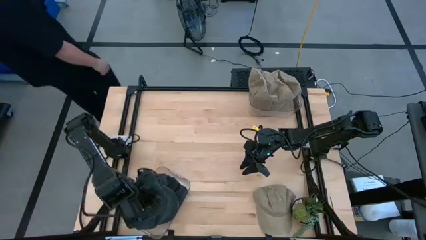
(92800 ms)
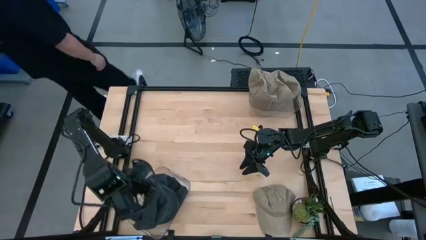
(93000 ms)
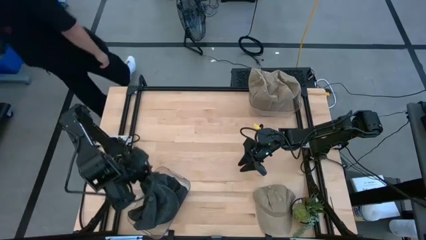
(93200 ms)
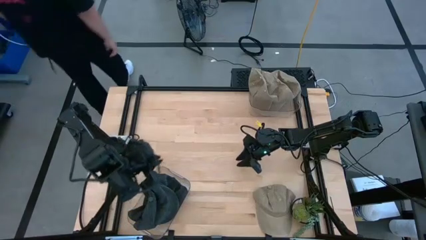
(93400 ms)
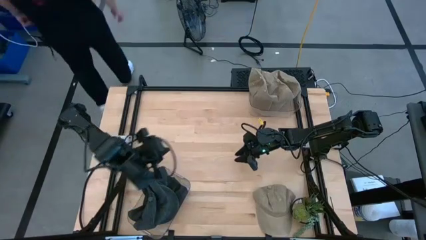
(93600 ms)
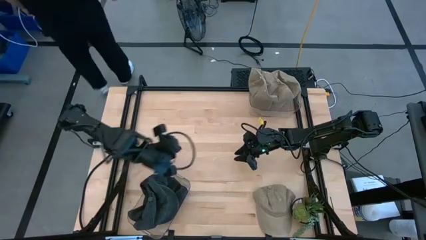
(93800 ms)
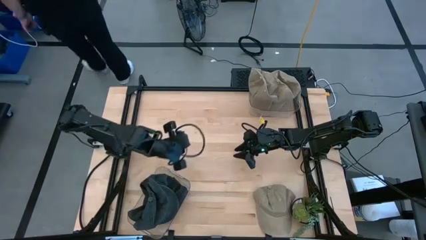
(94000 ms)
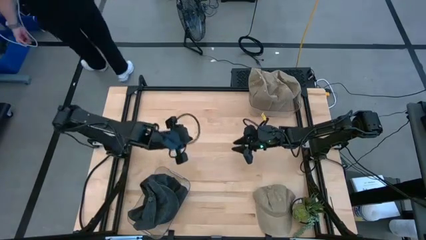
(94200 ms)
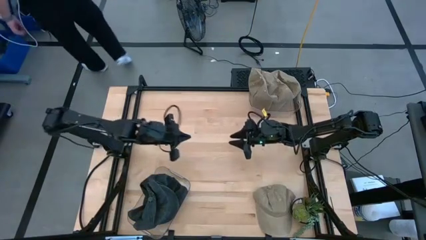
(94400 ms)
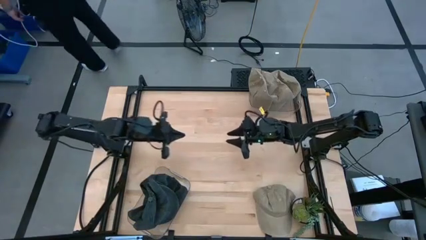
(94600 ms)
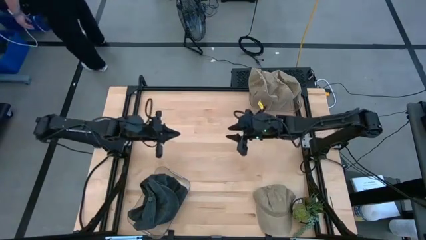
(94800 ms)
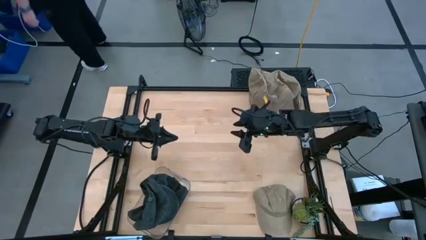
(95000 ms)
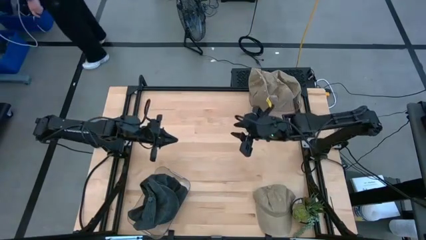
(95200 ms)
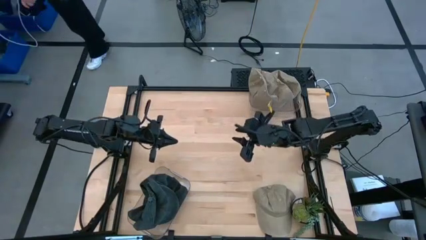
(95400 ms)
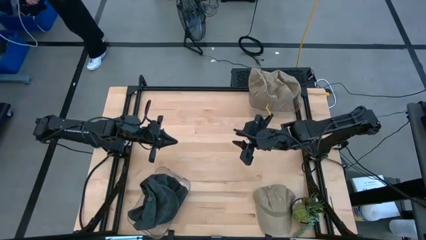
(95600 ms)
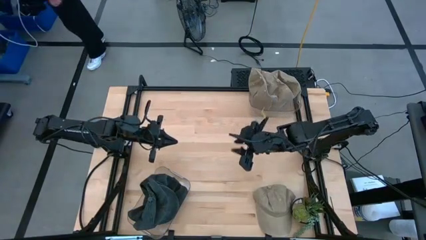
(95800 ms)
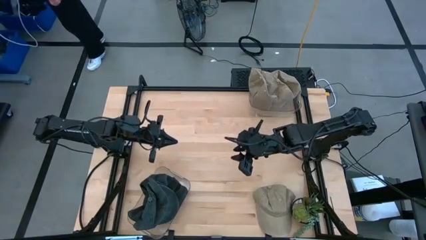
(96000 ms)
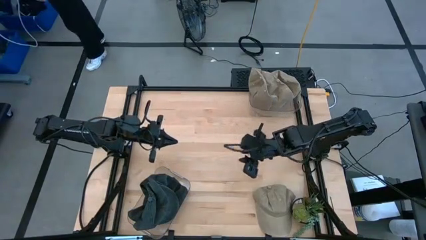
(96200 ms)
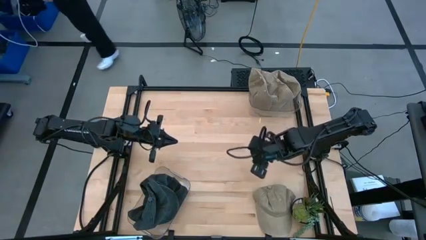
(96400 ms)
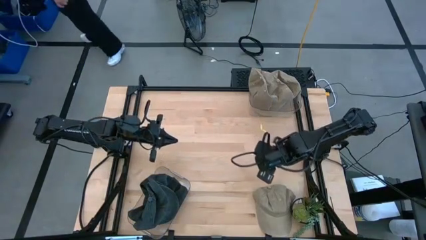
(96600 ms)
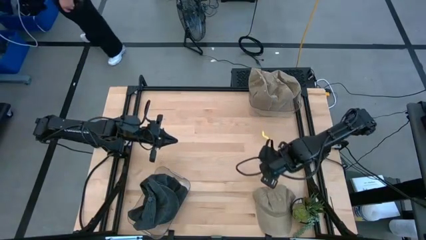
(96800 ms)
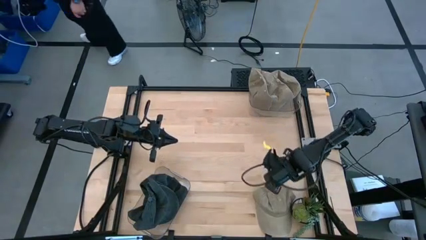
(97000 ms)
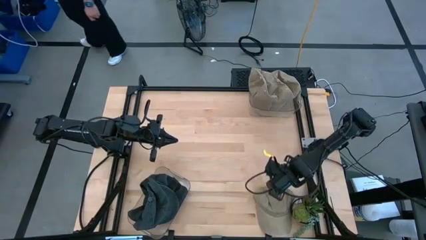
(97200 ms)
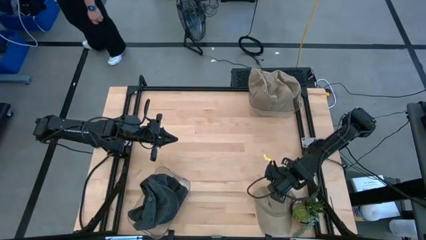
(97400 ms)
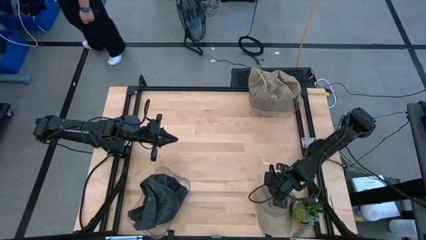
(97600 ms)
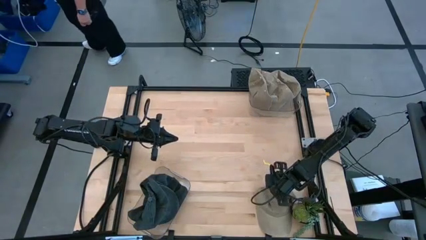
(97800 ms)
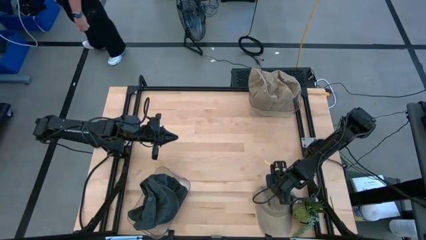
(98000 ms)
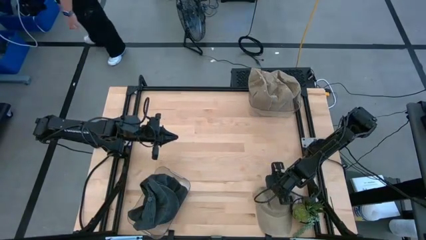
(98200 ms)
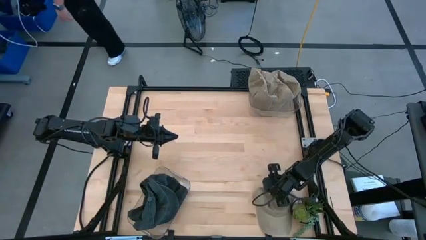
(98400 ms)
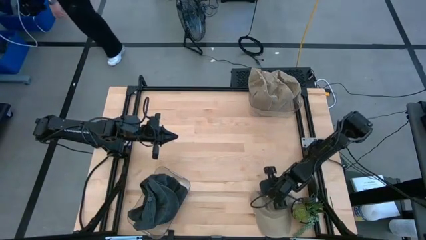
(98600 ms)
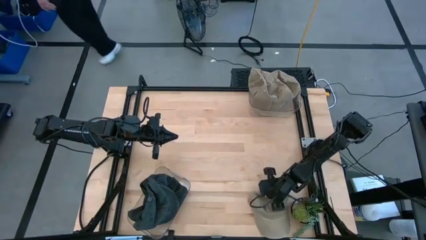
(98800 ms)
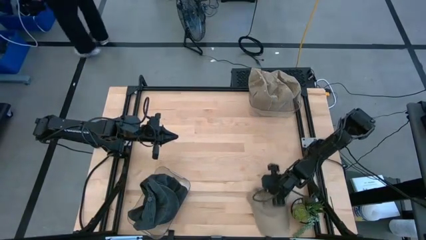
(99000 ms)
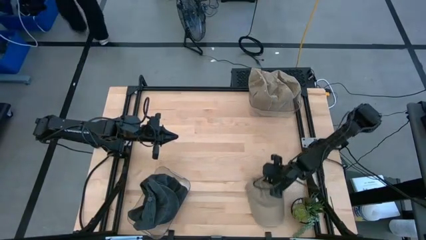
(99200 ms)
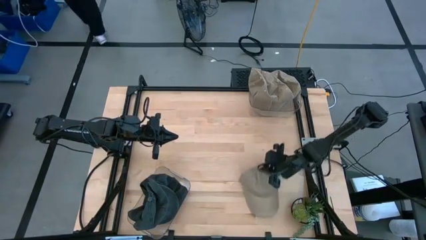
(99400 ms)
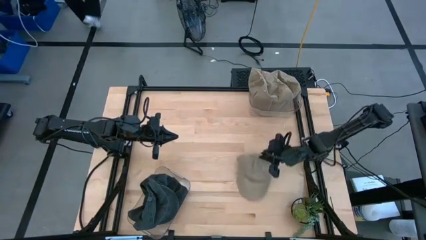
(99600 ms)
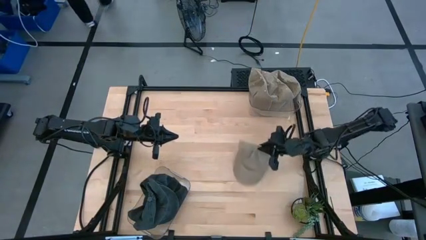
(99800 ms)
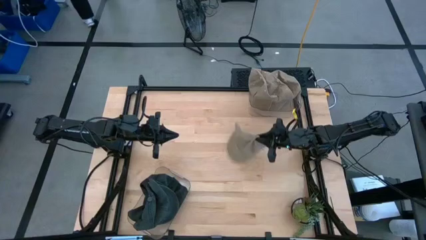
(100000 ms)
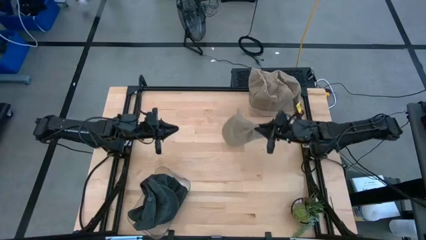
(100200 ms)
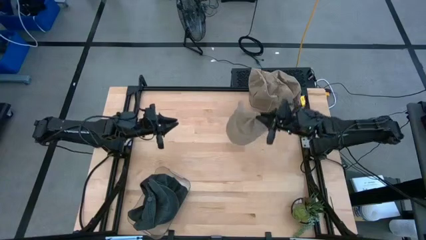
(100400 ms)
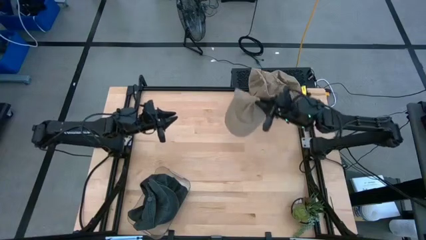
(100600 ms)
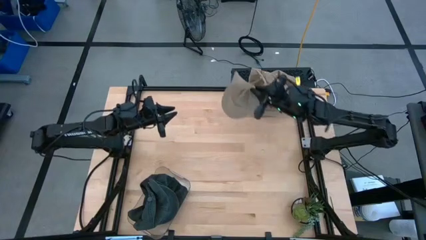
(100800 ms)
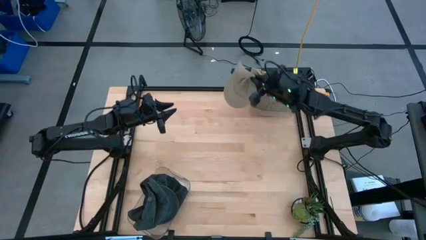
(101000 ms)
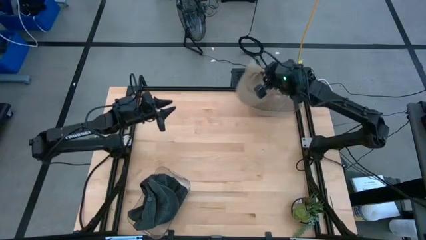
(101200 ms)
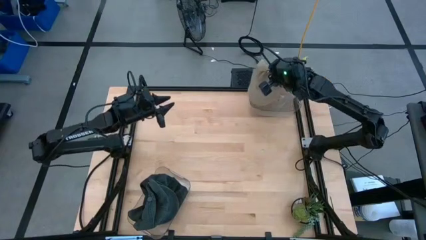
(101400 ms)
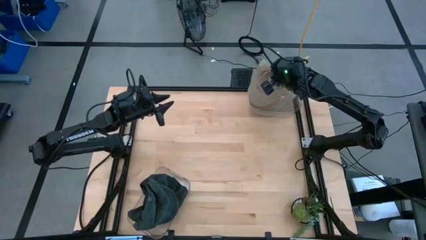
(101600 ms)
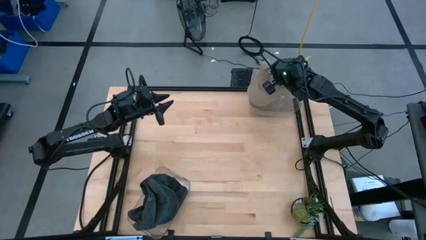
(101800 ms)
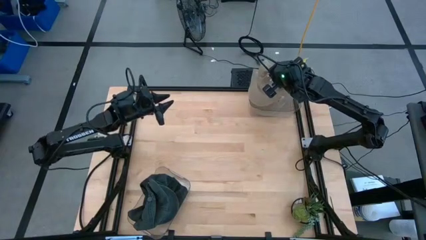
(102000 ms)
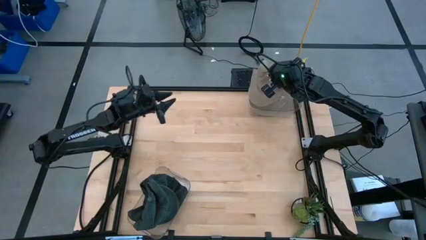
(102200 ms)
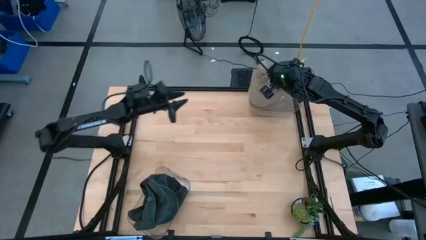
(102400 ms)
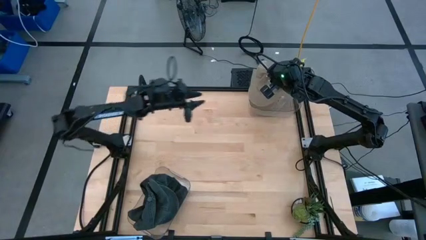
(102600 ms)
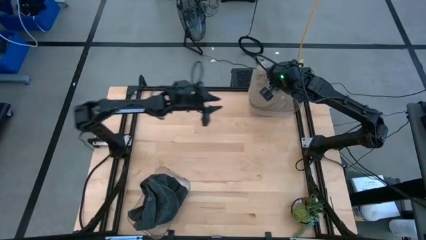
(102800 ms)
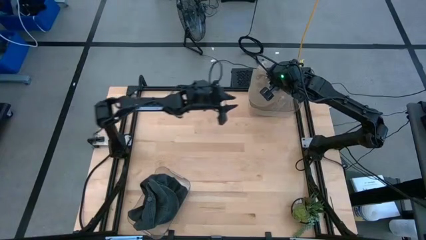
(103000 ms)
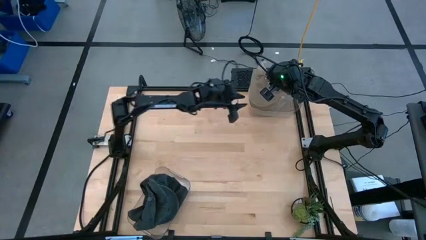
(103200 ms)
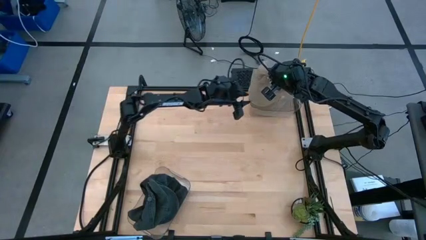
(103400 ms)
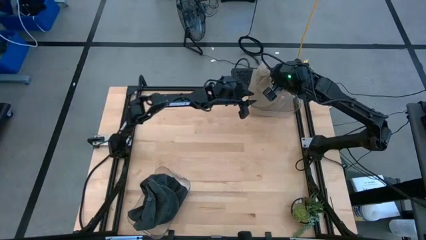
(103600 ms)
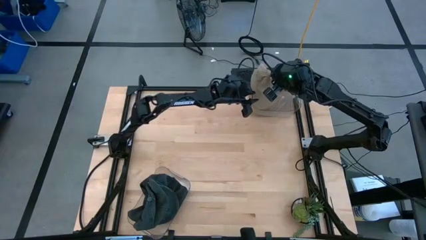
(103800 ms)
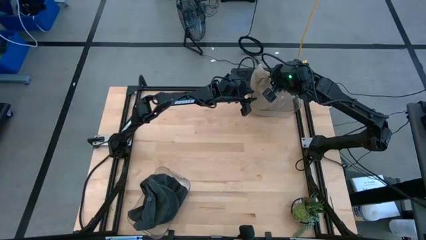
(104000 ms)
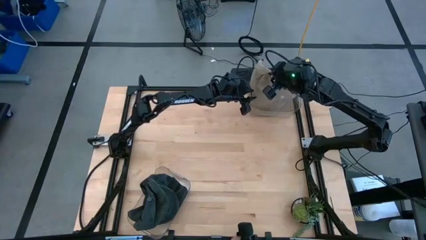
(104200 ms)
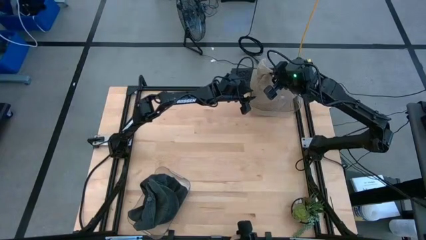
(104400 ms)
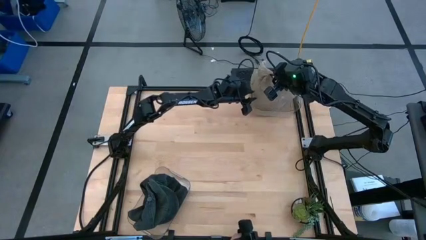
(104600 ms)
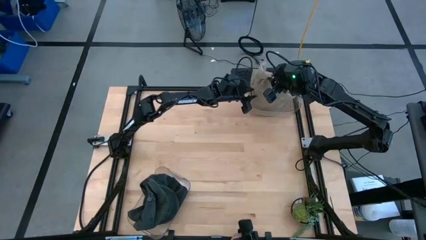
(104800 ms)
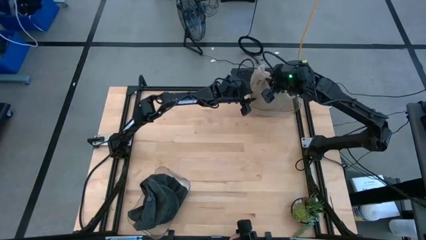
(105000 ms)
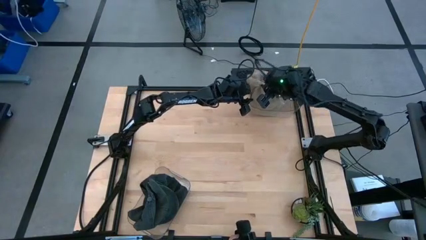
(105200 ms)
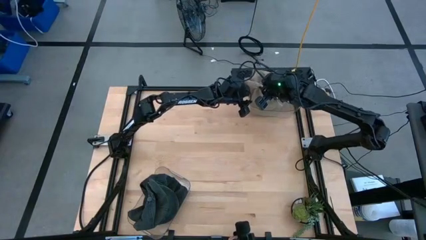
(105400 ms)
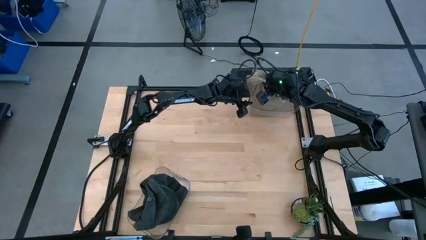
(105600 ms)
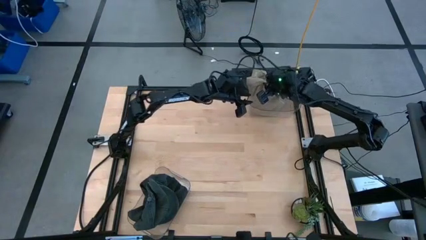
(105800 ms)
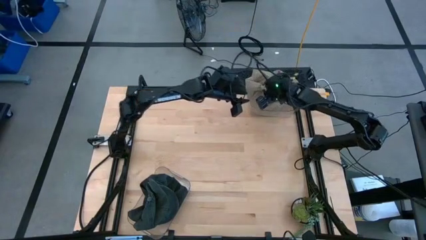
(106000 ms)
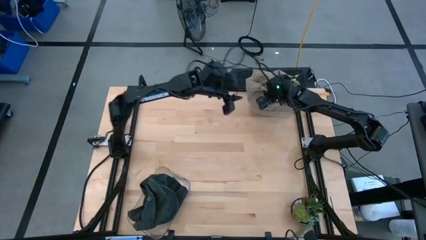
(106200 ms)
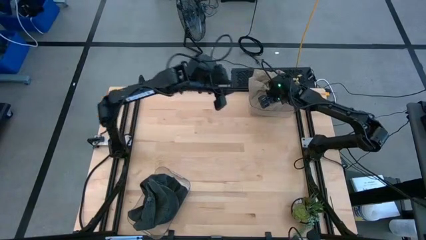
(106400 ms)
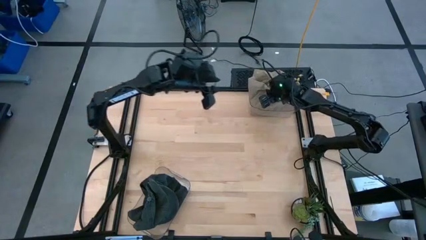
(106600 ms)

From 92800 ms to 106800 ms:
Task: Pick & Place hat
Put the brown cap into the top transparent bin
